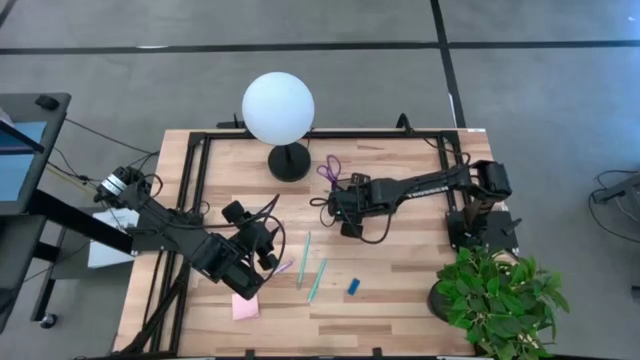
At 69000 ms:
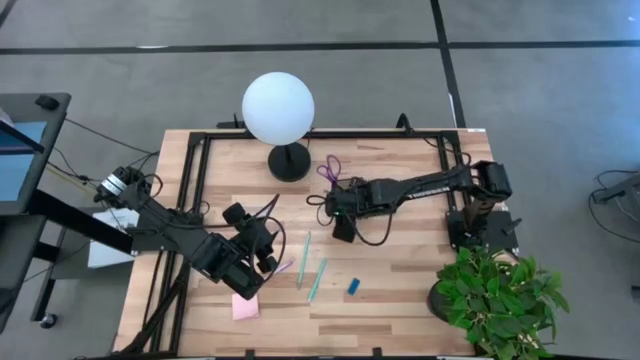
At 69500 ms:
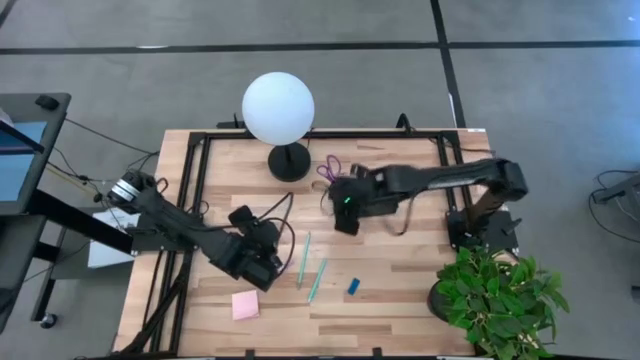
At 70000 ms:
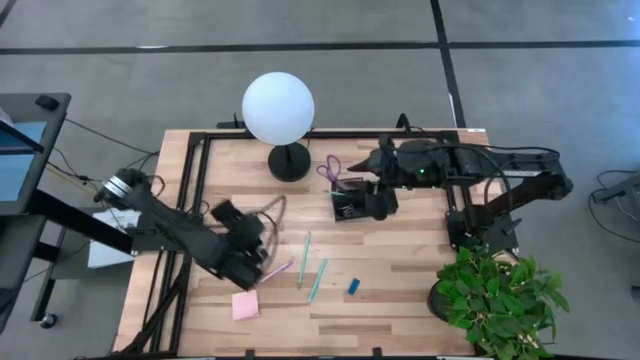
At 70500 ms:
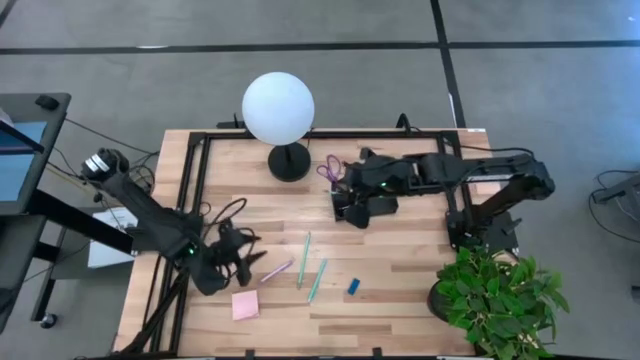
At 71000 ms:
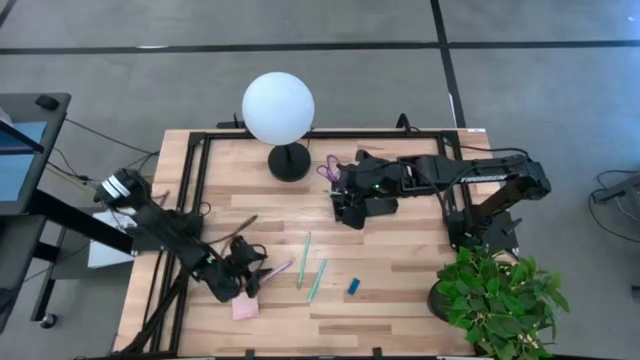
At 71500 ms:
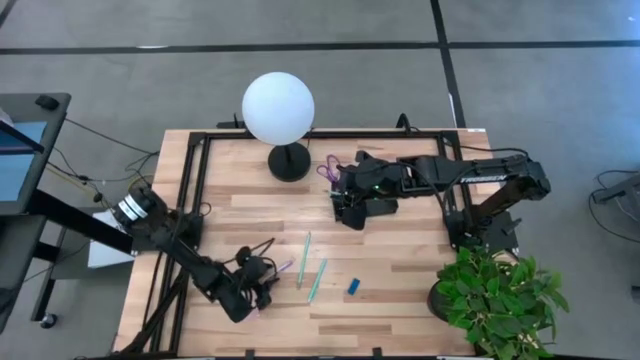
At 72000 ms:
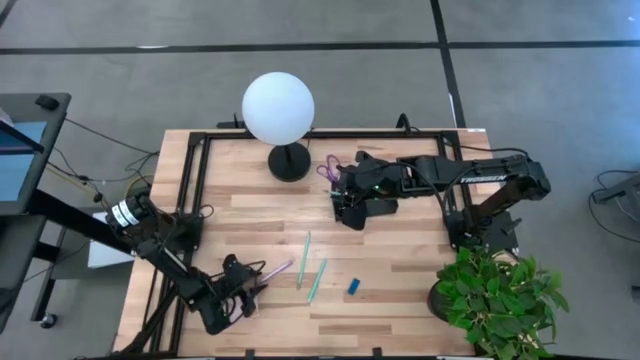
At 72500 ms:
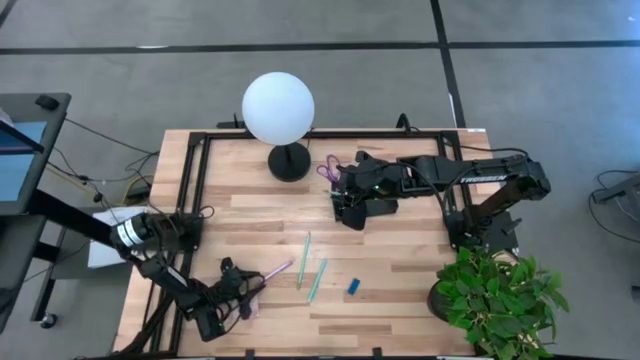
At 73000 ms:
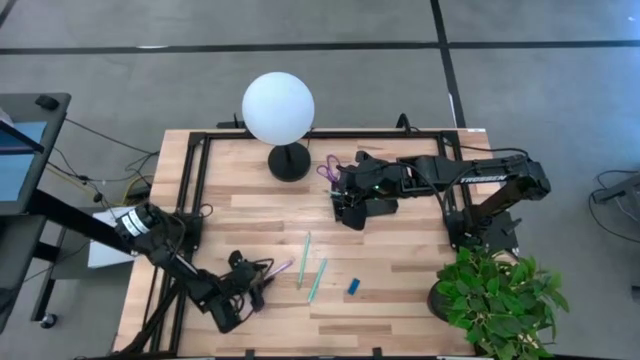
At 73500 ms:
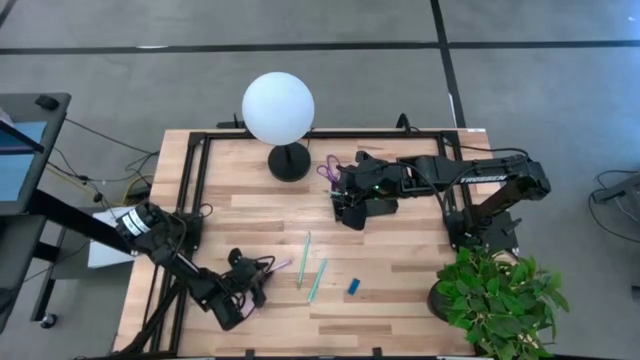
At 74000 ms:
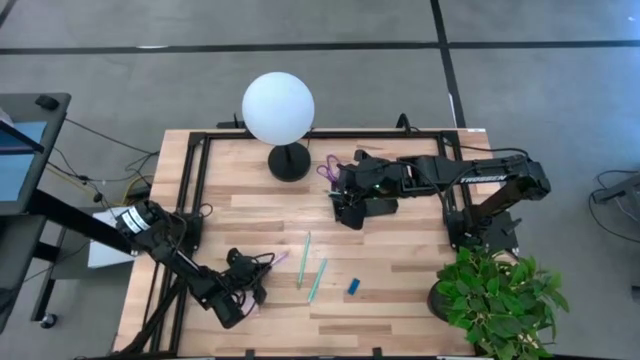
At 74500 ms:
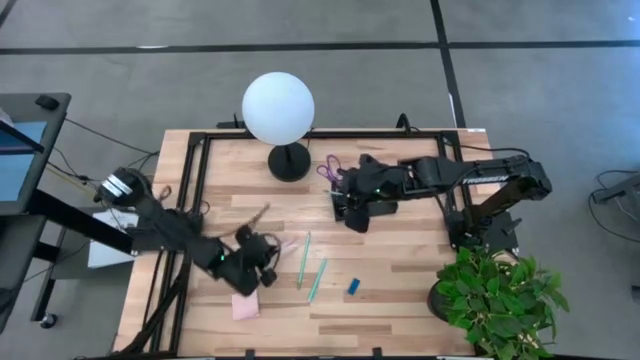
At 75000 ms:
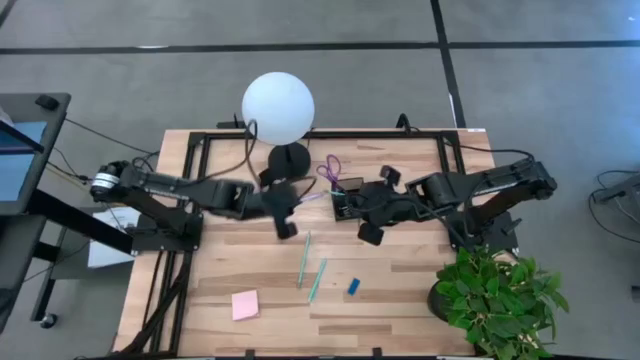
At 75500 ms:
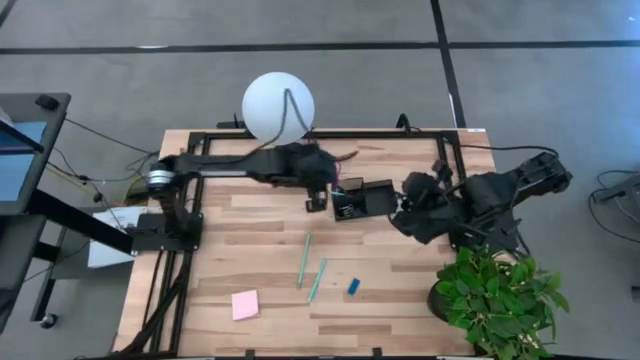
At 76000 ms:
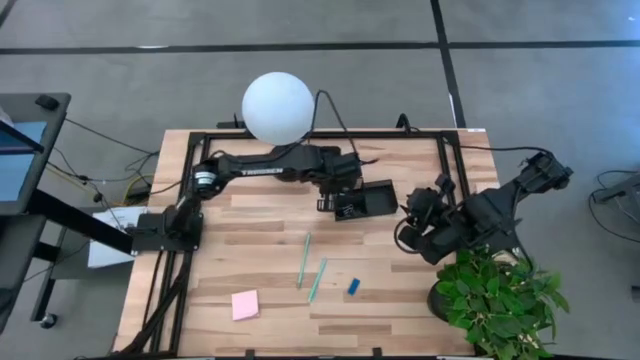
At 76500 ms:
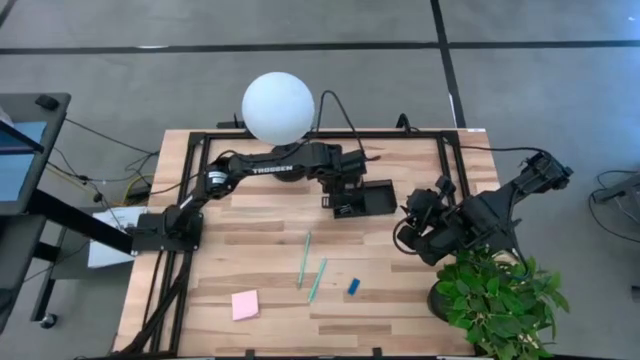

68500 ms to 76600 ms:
Task: Pick and place office supplies into organizer
Put the purple pen into the black desk organizer

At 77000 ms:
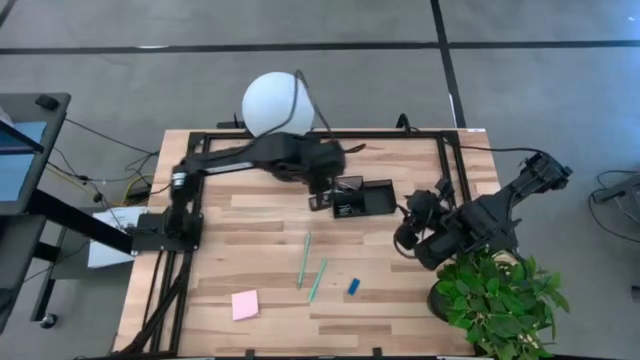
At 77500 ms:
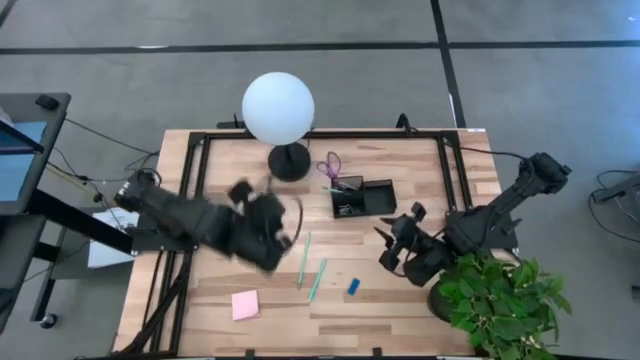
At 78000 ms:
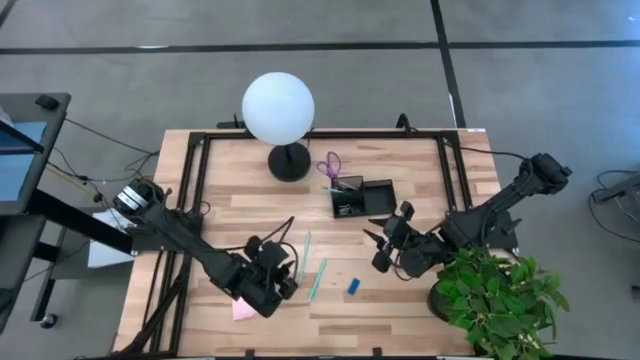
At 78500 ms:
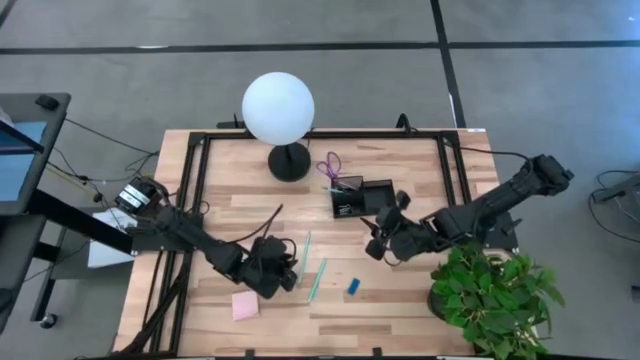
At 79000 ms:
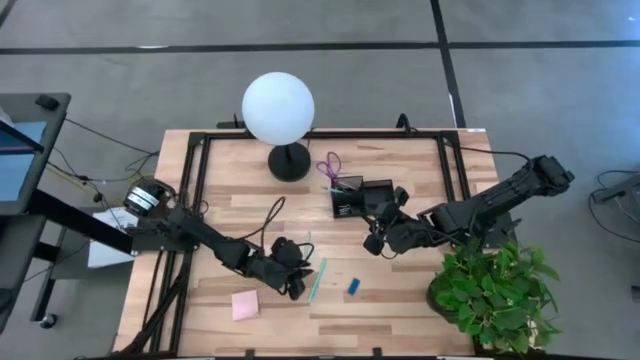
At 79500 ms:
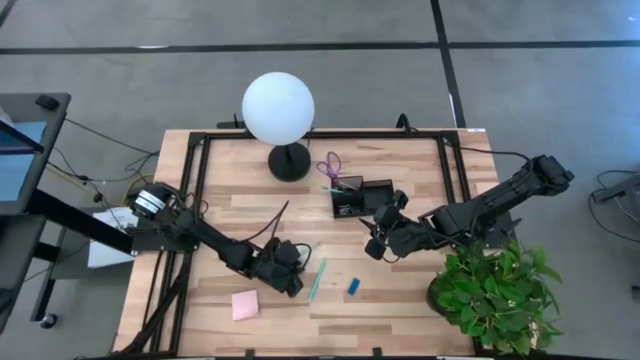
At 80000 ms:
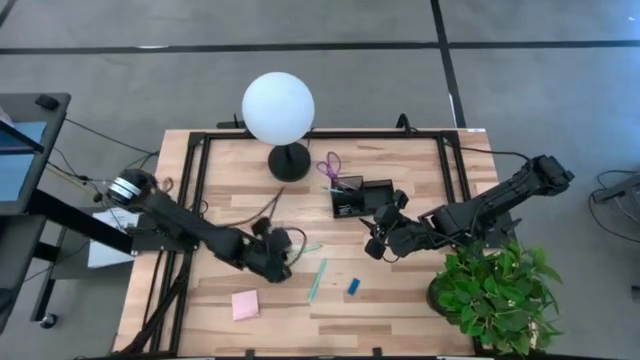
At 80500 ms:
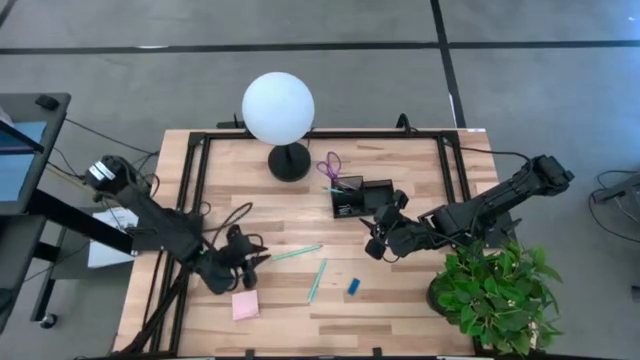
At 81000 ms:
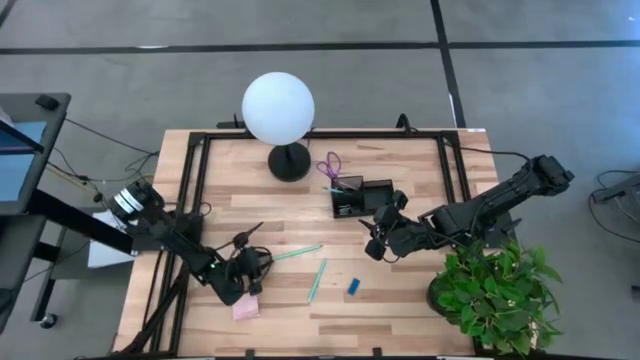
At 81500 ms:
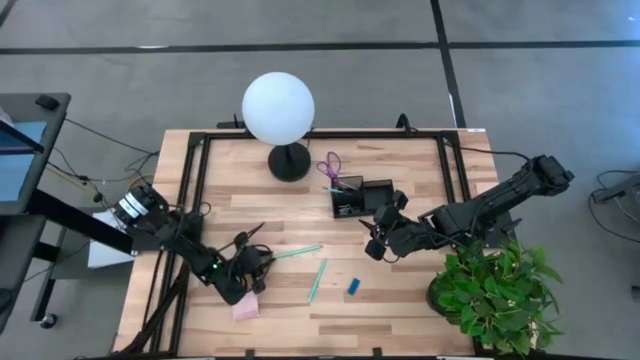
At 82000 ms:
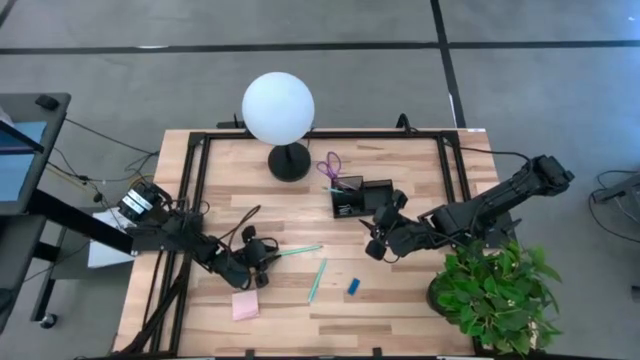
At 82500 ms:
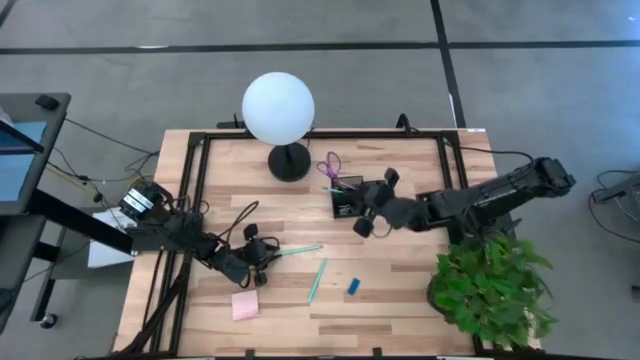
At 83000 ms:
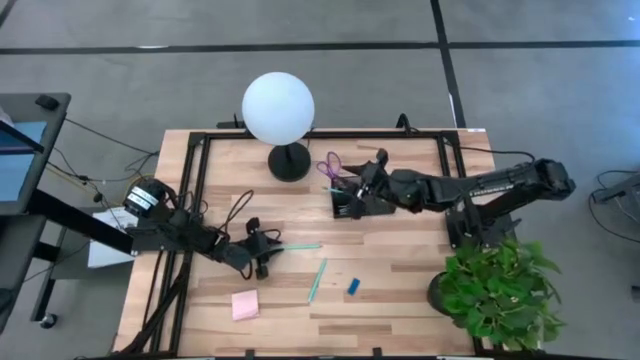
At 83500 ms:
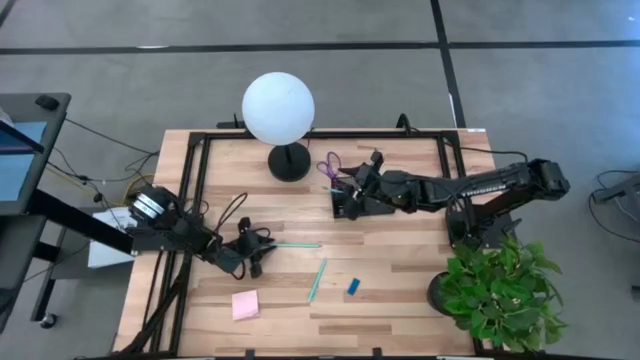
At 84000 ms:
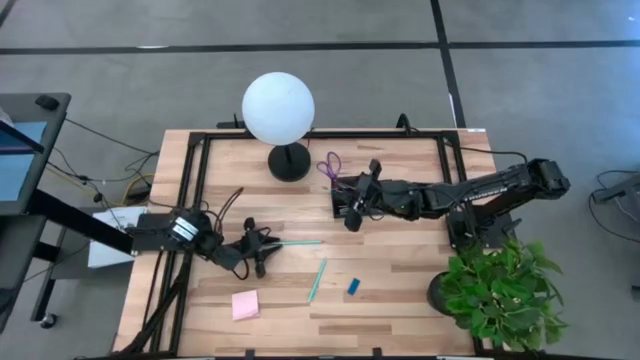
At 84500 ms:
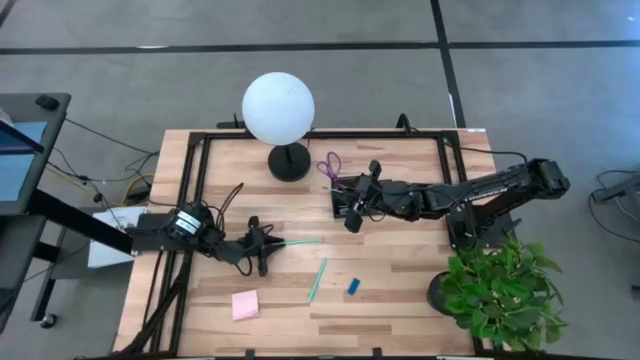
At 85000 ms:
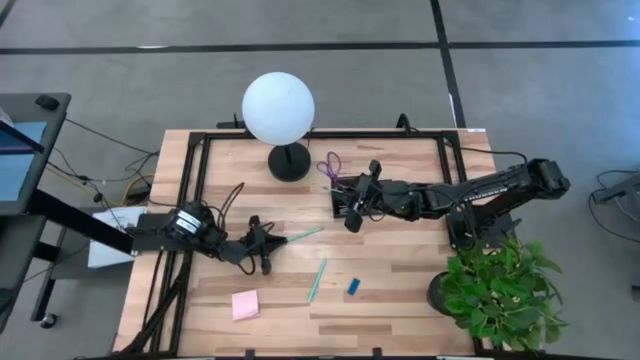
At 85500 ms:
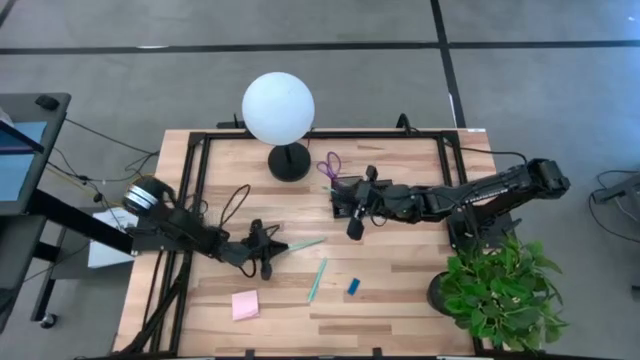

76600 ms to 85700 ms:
Put the left light blue pencil into the black desk organizer

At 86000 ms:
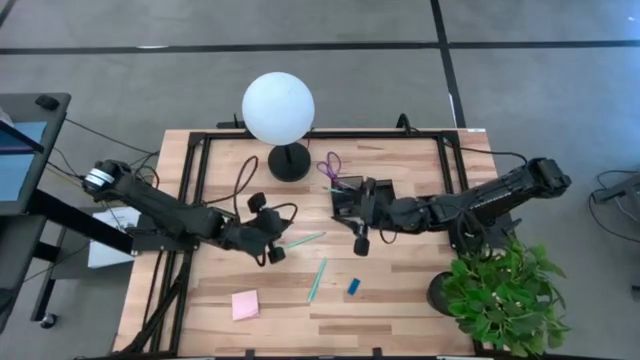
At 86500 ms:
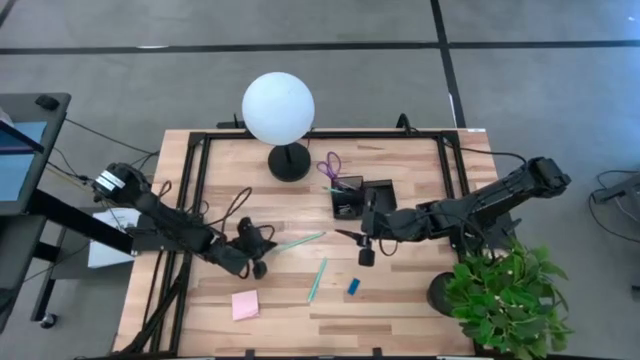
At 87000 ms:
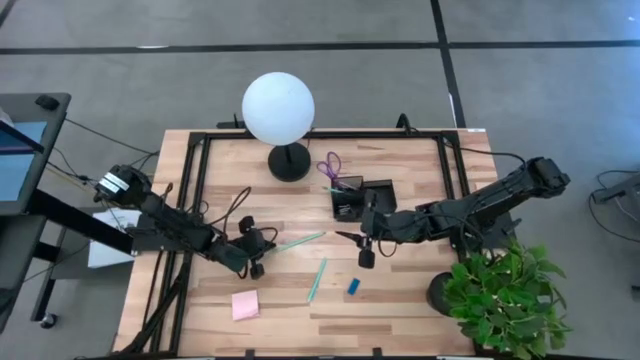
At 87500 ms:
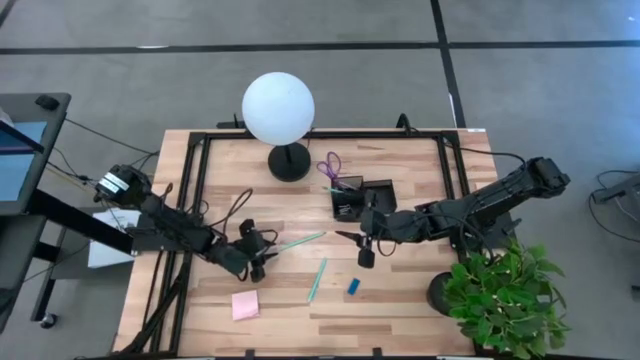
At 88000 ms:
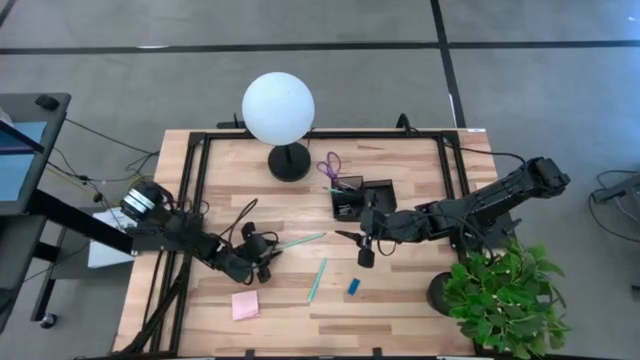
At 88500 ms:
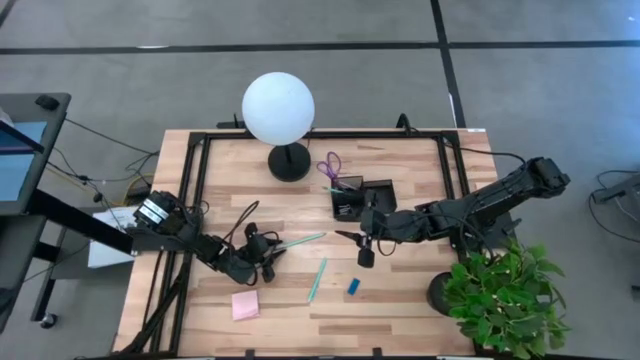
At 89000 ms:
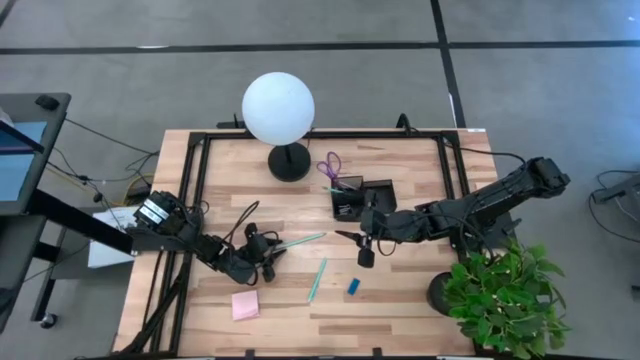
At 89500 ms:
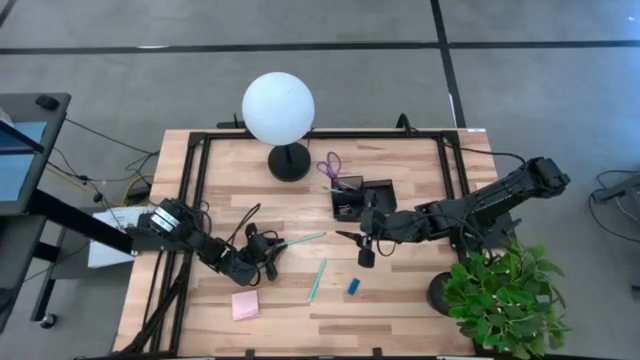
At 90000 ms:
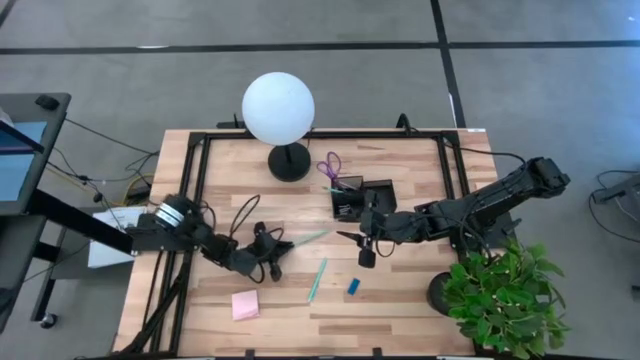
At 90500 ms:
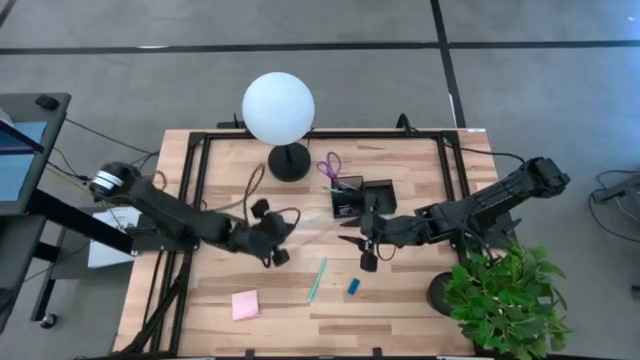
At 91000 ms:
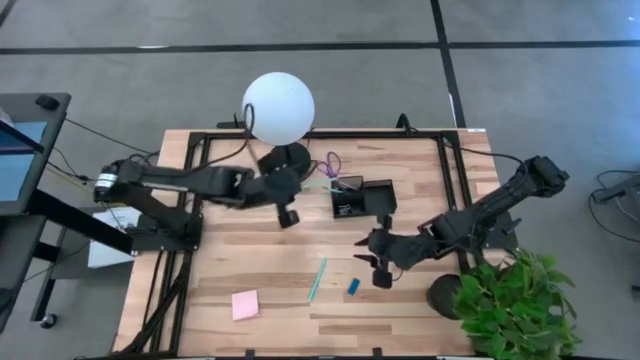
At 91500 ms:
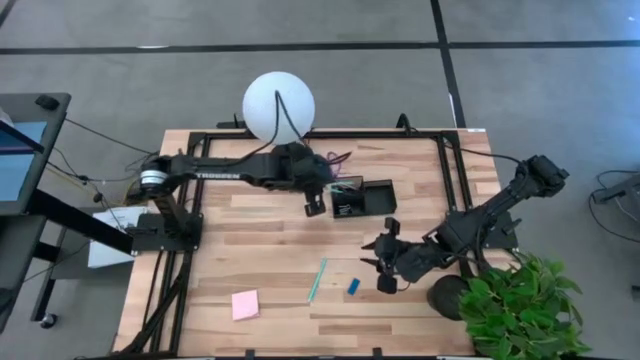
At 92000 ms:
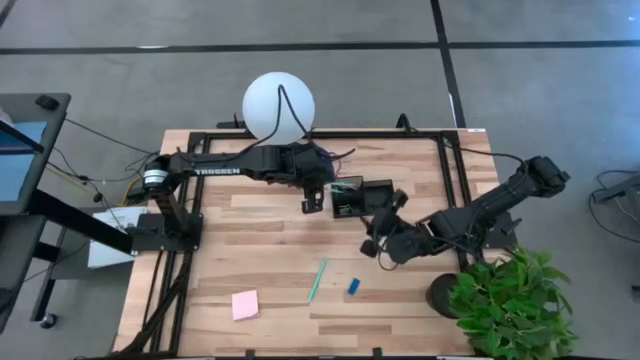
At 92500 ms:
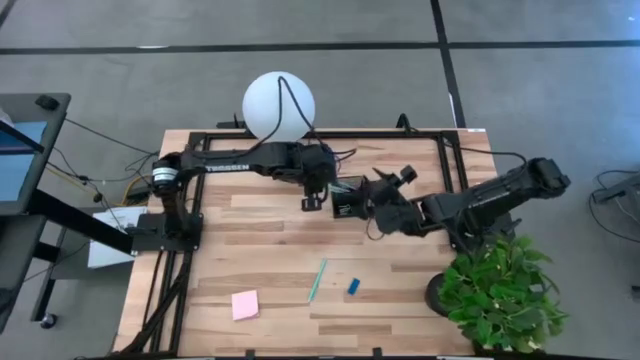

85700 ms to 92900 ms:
Put the left light blue pencil into the black desk organizer
